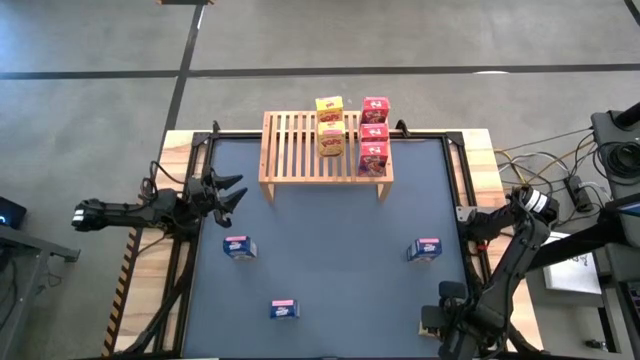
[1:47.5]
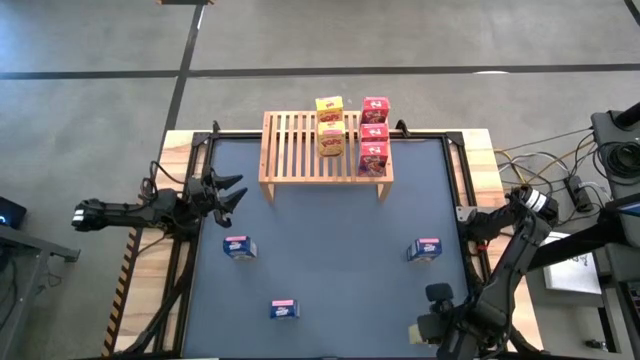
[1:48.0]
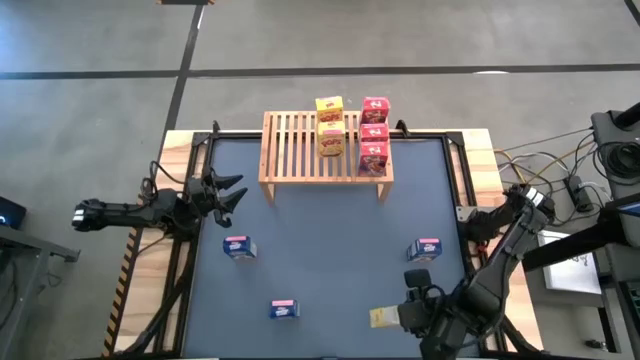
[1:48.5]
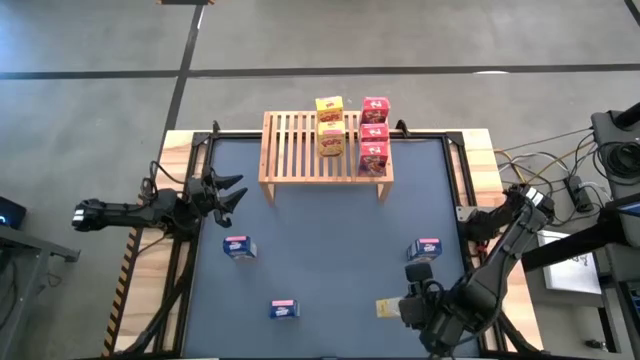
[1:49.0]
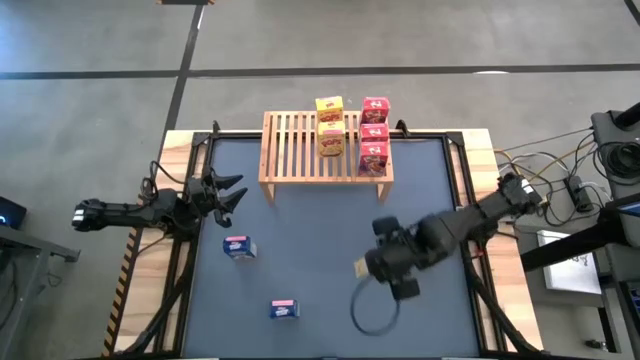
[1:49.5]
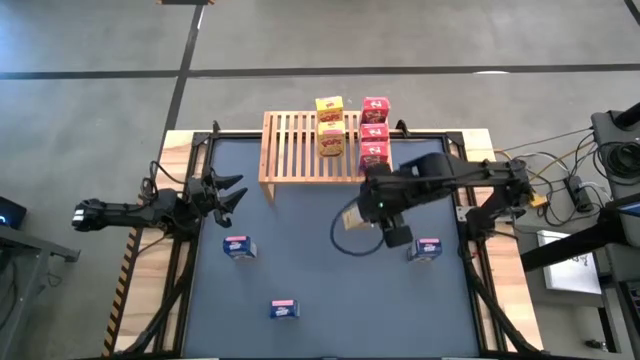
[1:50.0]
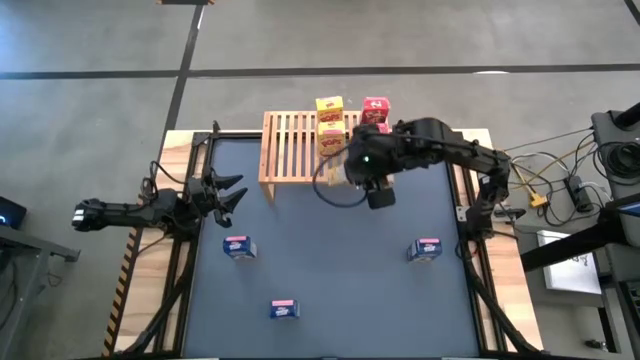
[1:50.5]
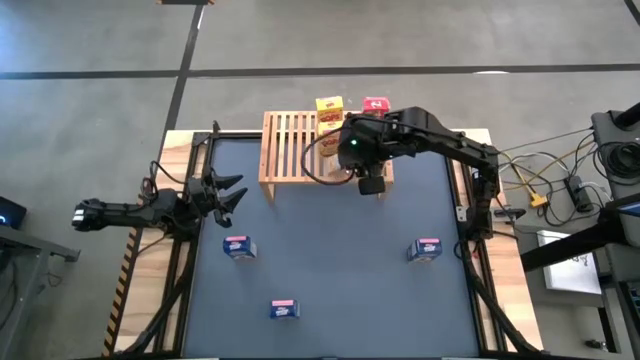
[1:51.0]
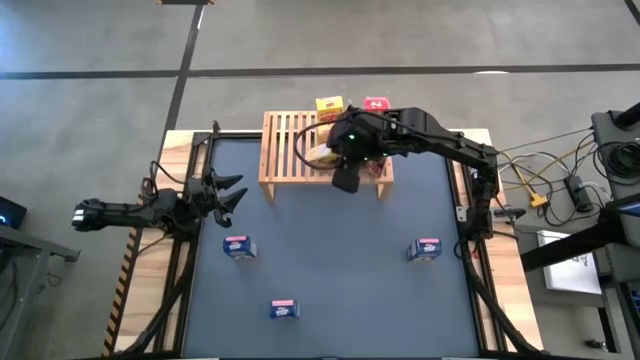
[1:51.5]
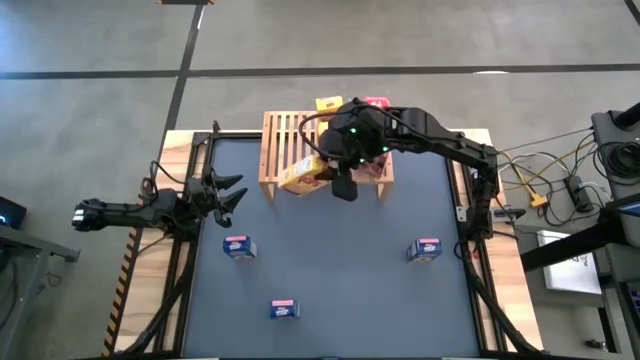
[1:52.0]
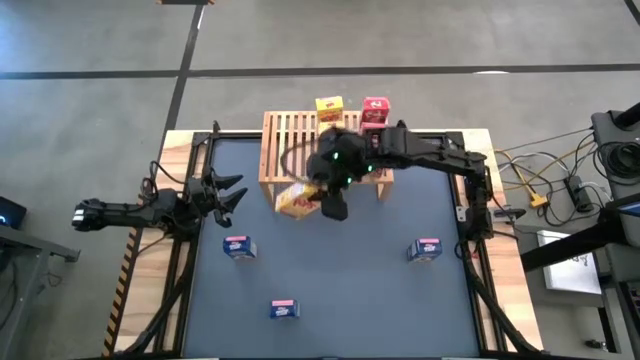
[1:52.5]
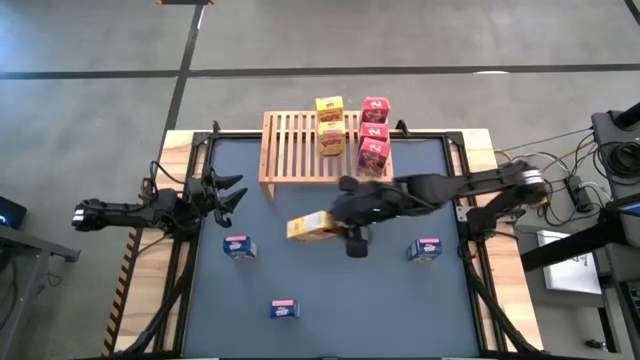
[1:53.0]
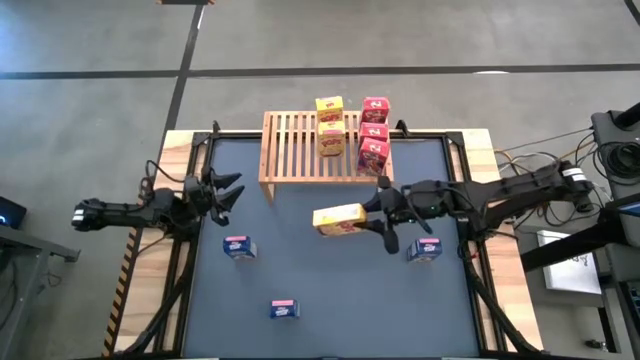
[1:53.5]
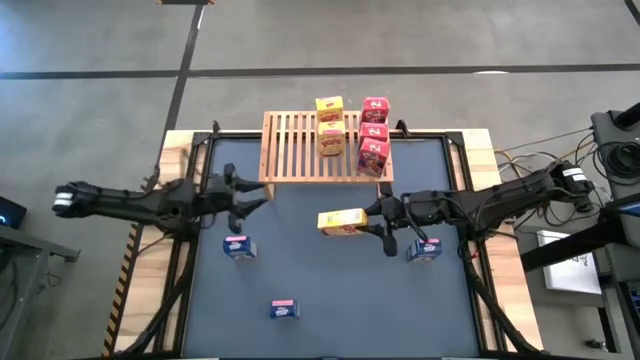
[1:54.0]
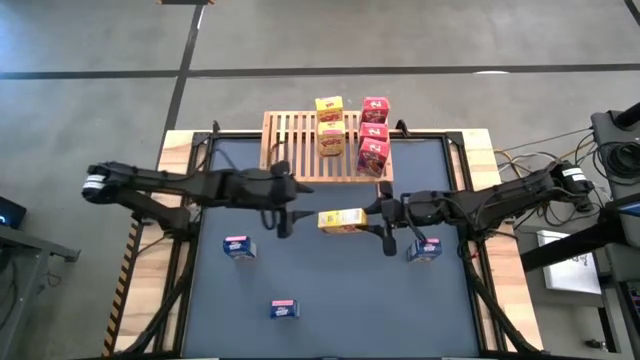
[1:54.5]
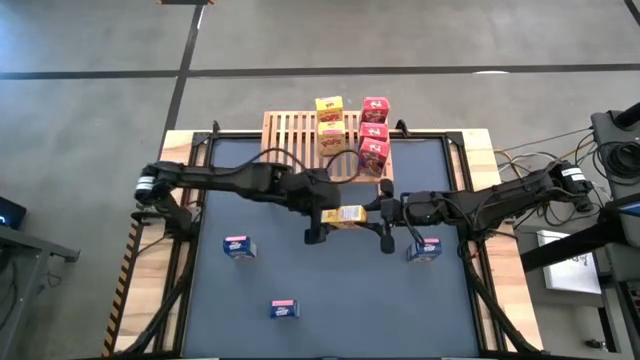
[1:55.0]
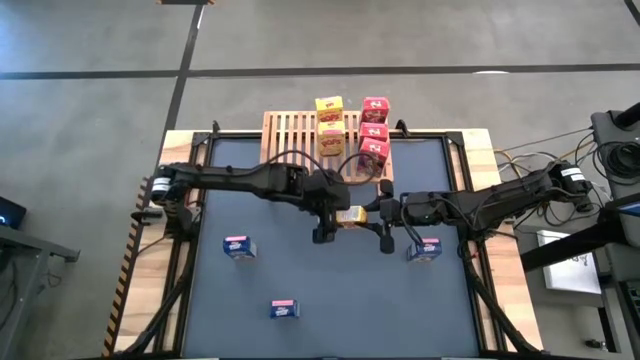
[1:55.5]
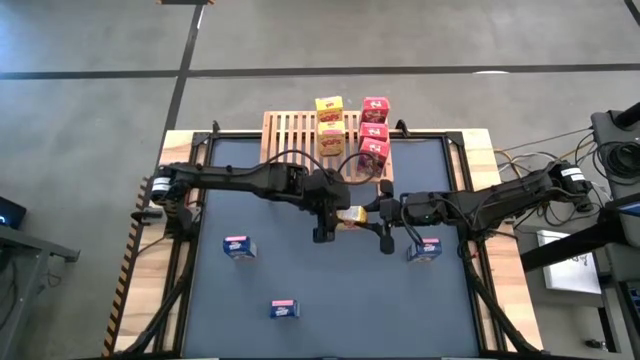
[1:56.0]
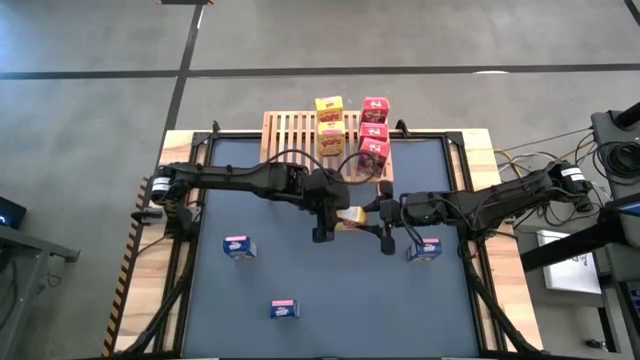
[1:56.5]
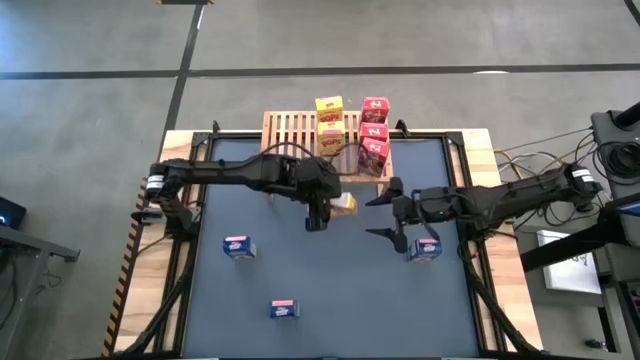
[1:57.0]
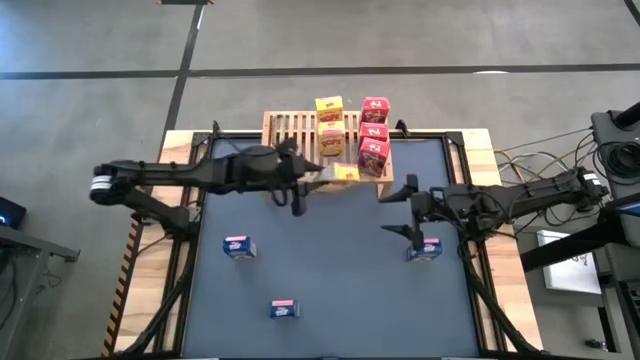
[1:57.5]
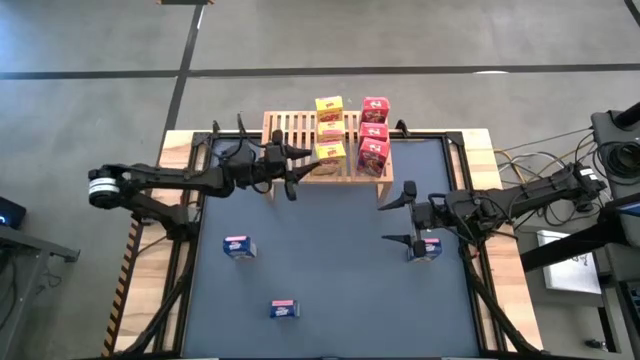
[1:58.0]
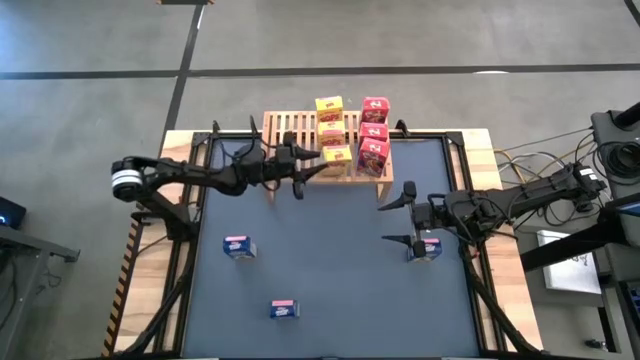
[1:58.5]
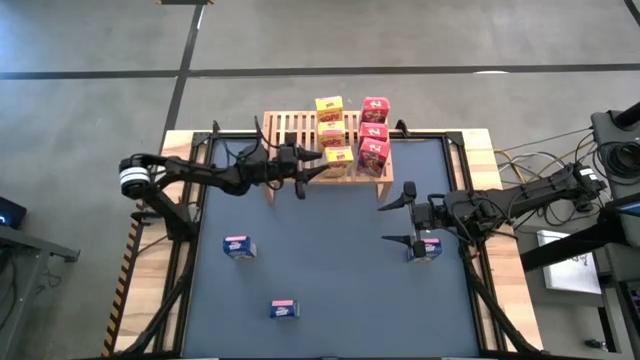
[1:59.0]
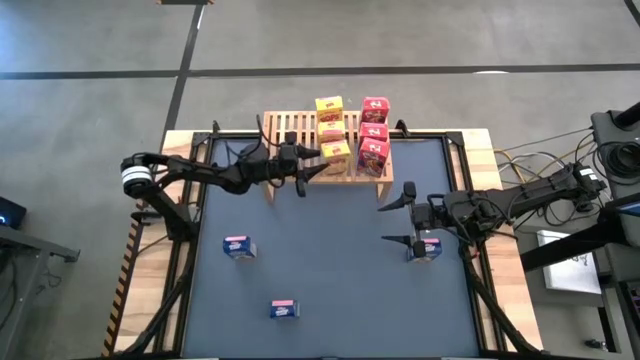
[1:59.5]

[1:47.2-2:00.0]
Task: Stack cereal on shelf
Put the yellow cereal box on the shelf aligned with the other yellow cereal boxes

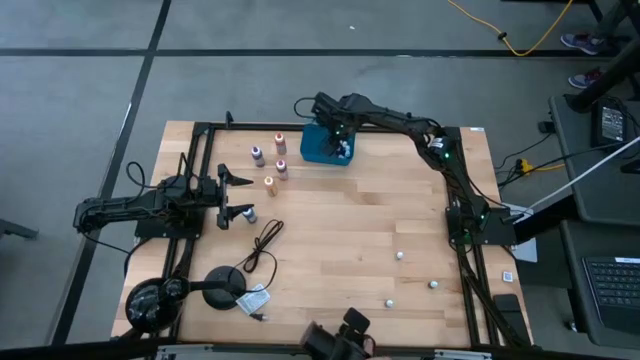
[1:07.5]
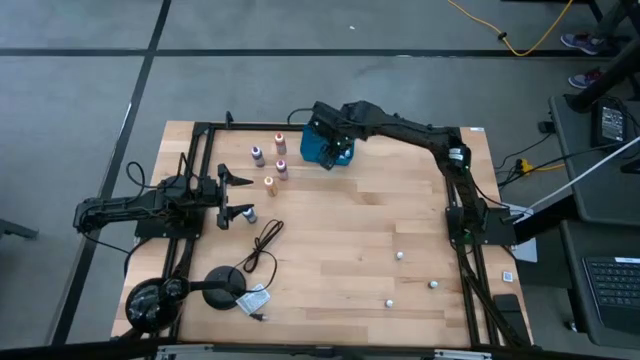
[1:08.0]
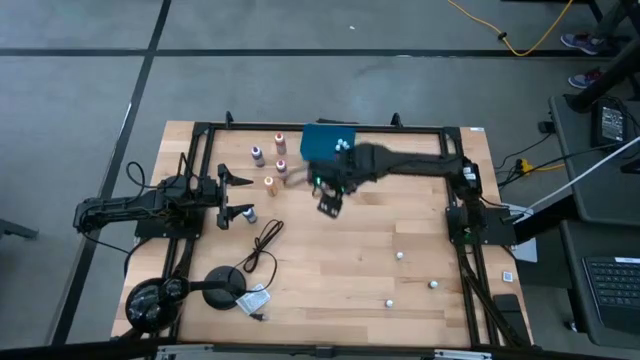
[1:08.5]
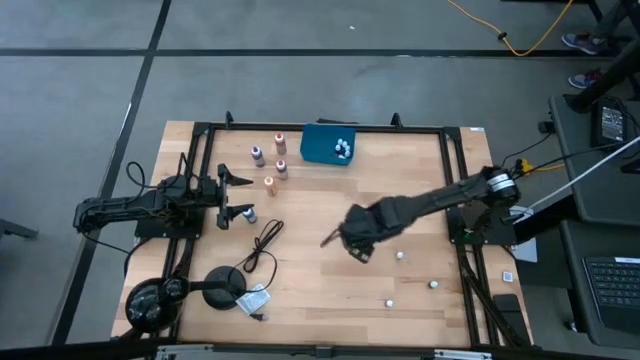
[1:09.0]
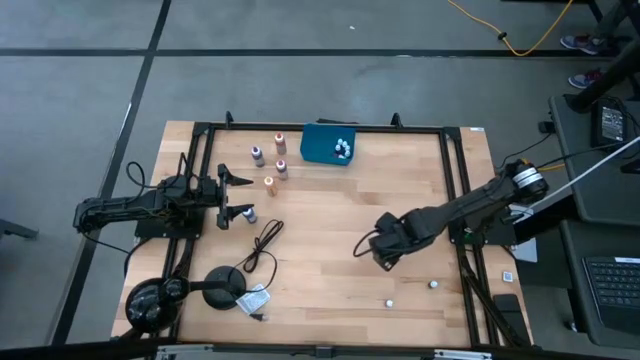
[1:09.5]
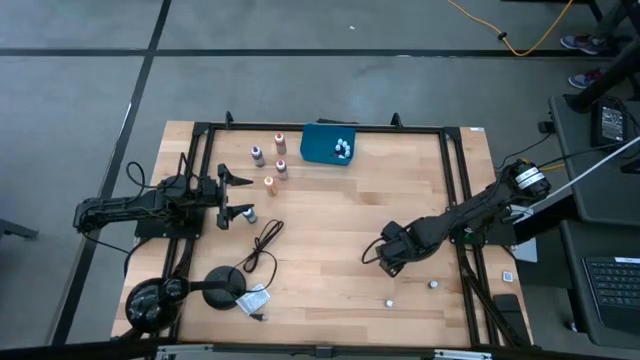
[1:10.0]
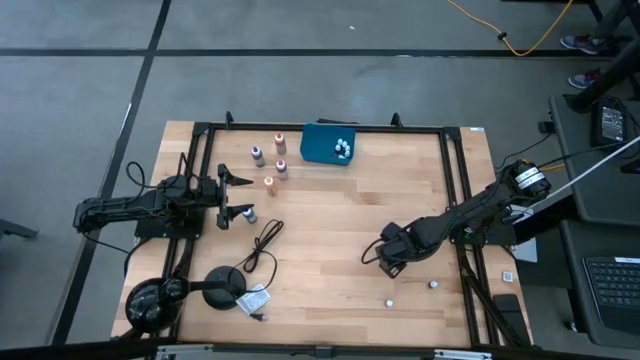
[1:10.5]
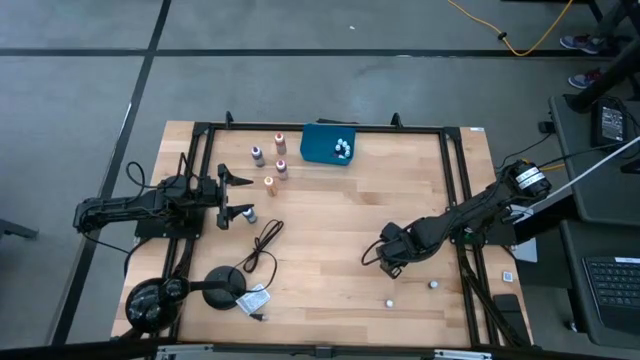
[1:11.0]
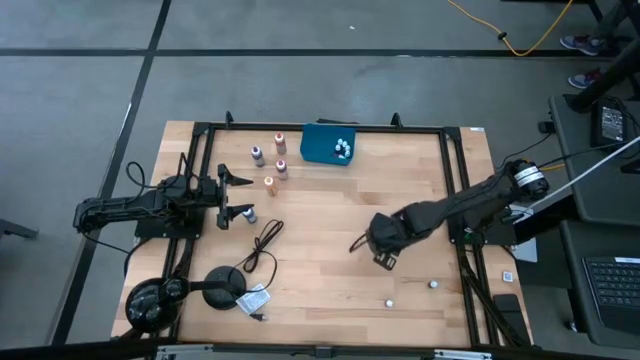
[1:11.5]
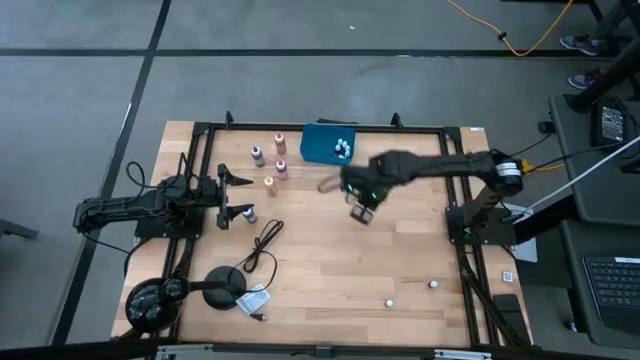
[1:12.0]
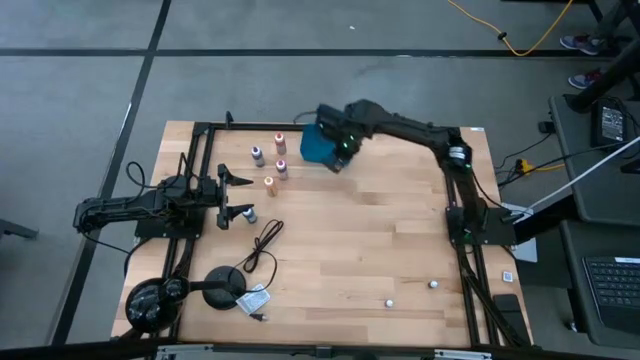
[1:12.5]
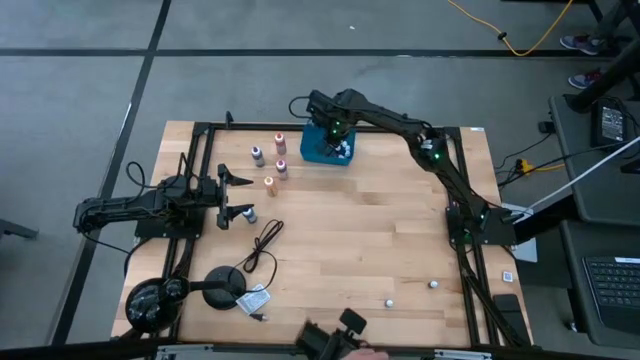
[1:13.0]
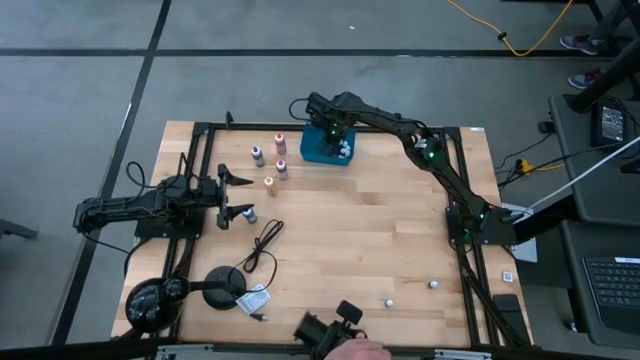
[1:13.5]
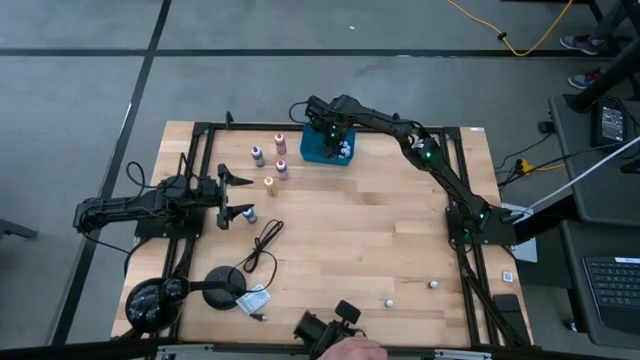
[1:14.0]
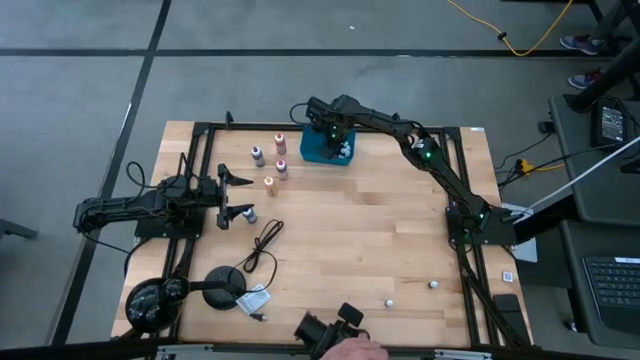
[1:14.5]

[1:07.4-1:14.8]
Task: Pick & Place food coloring
Put the small black food coloring bottle into the blue container

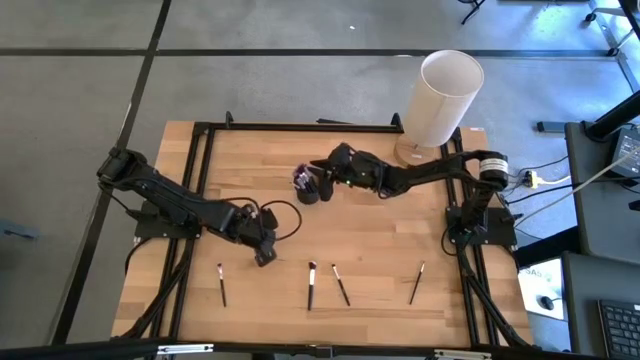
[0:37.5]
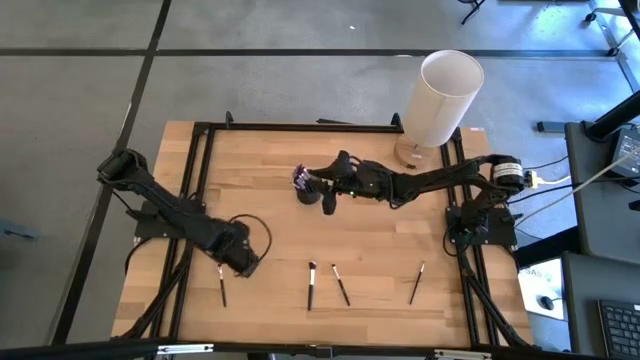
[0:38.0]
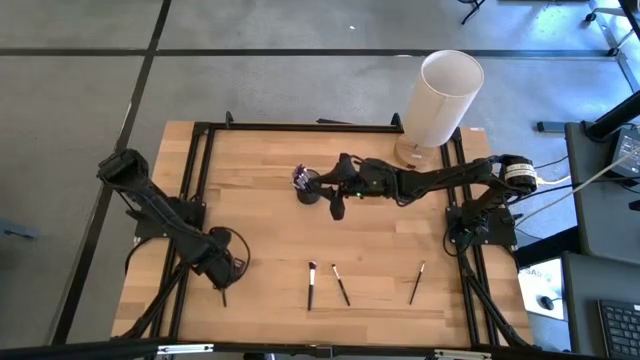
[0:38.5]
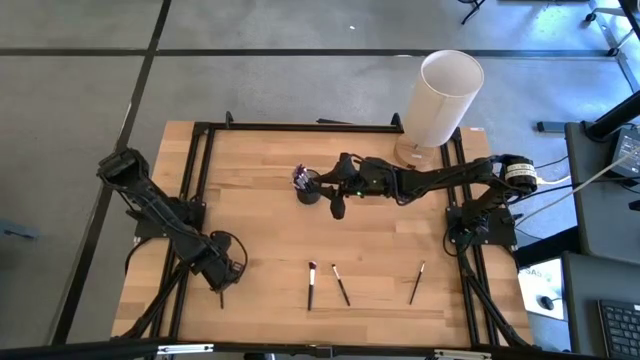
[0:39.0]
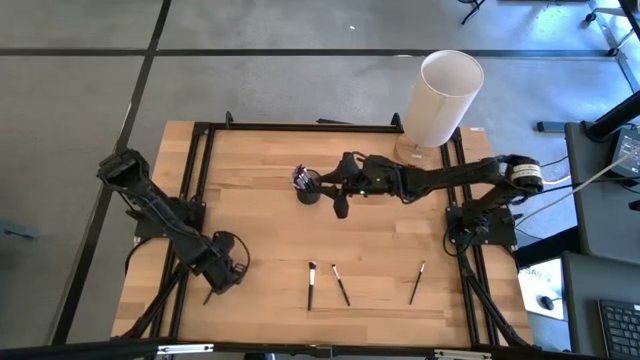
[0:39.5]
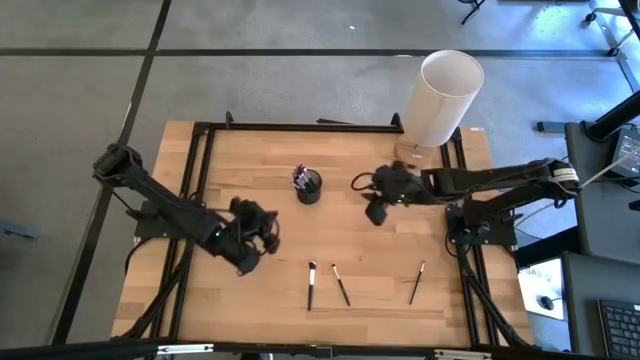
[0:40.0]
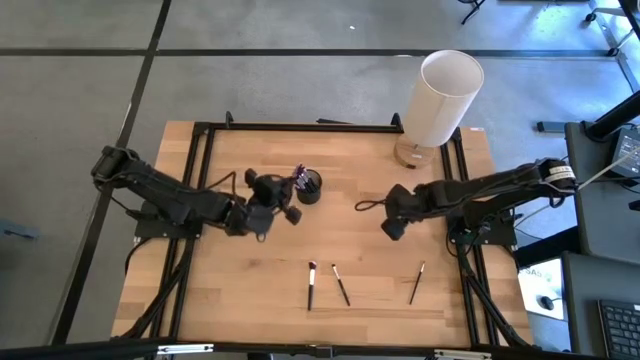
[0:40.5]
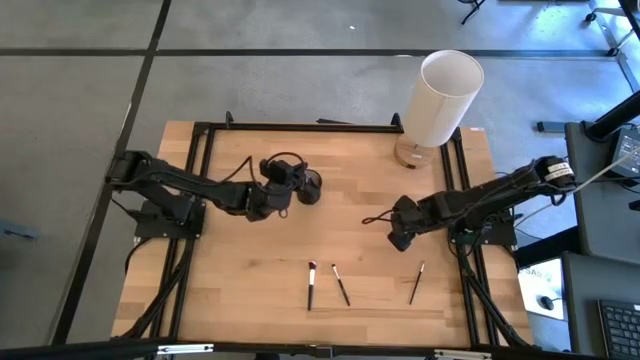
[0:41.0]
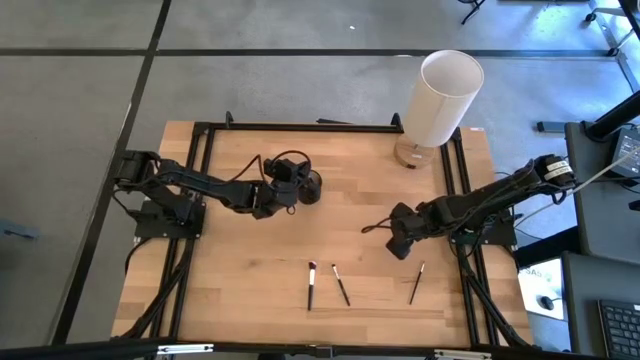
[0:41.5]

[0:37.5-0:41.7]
Task: Put items in baskets/containers
Put the black eyeshadow brush into the black pen holder
